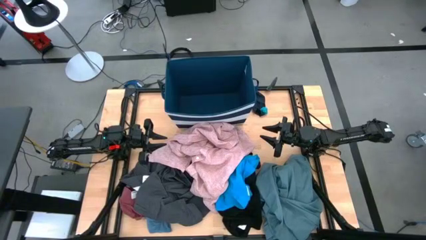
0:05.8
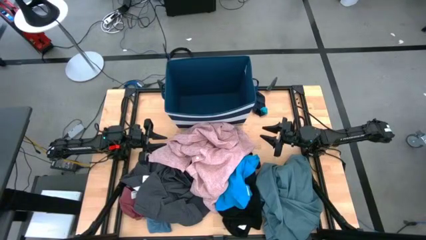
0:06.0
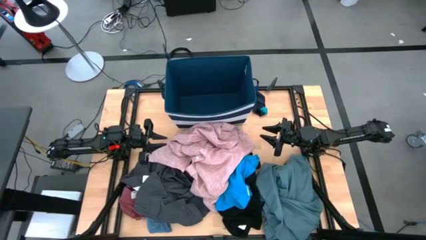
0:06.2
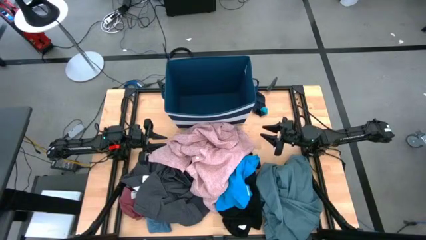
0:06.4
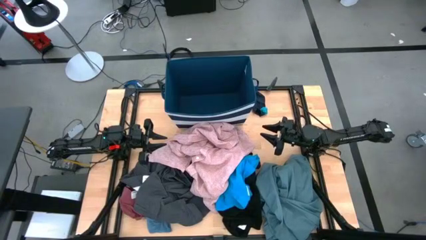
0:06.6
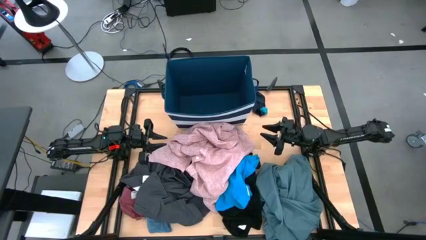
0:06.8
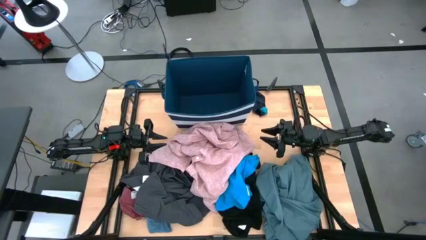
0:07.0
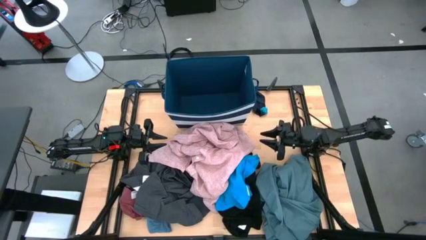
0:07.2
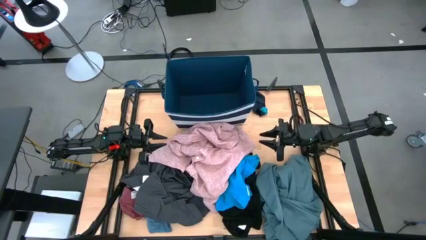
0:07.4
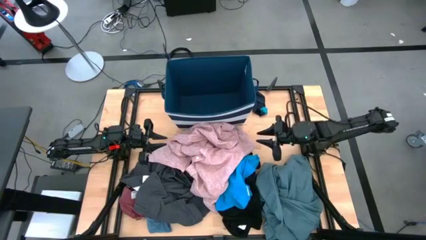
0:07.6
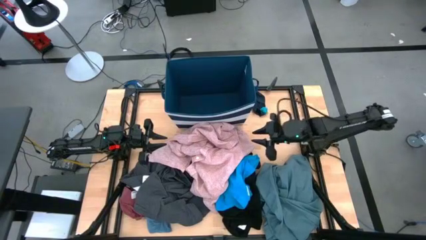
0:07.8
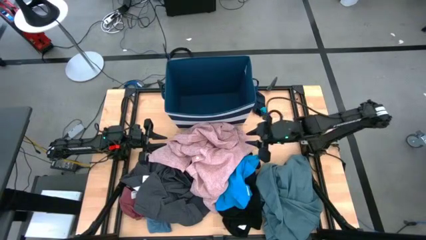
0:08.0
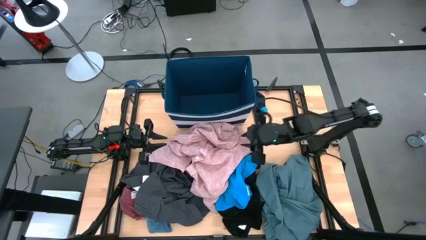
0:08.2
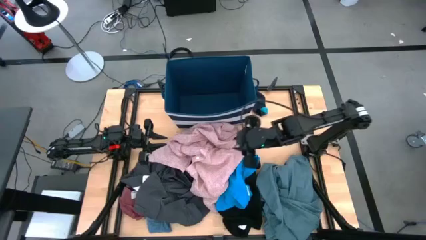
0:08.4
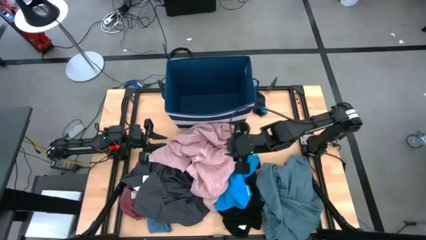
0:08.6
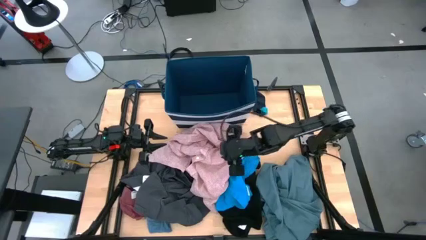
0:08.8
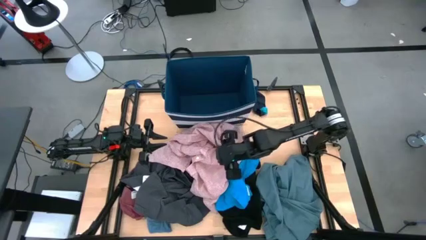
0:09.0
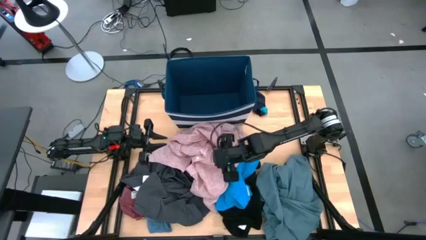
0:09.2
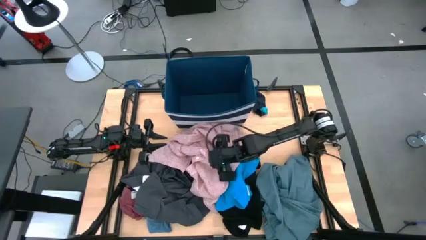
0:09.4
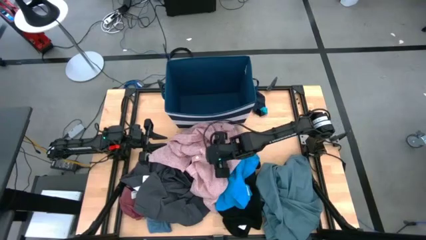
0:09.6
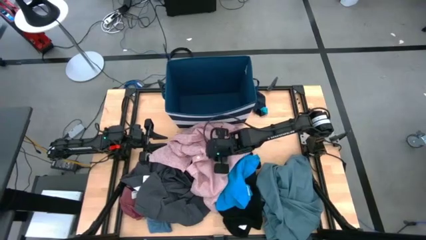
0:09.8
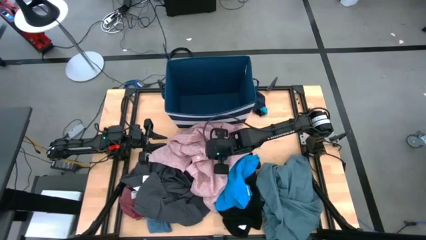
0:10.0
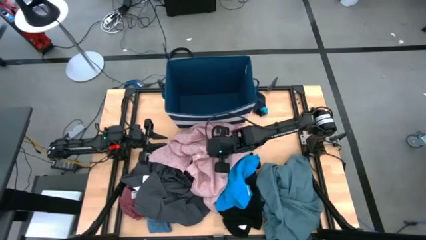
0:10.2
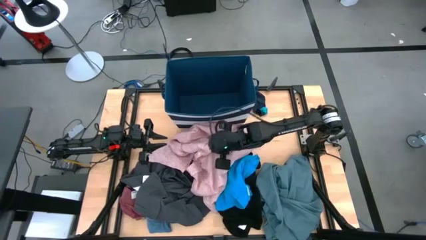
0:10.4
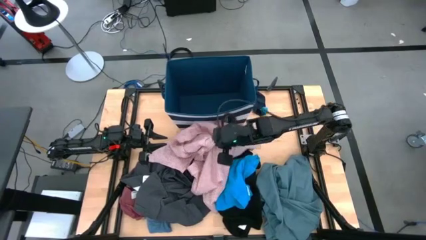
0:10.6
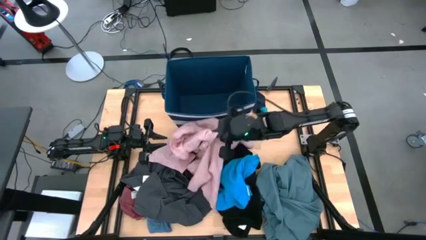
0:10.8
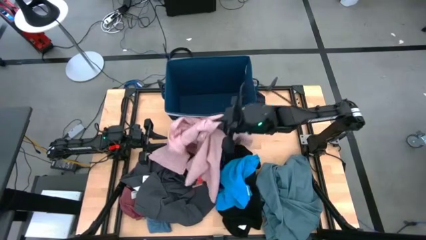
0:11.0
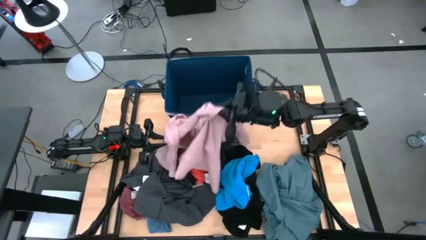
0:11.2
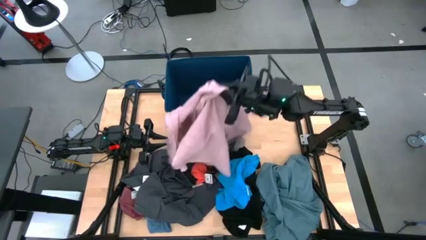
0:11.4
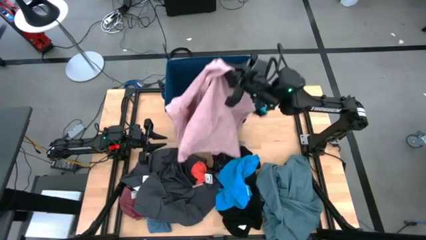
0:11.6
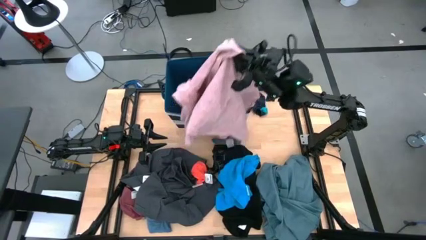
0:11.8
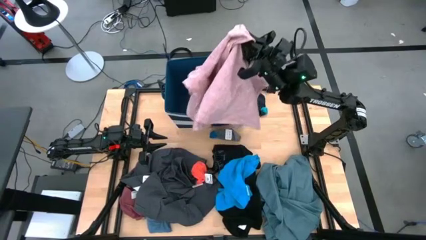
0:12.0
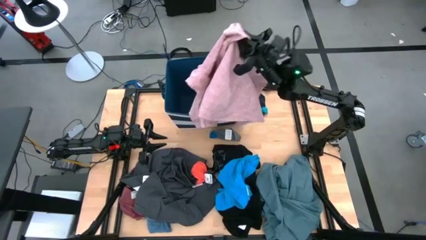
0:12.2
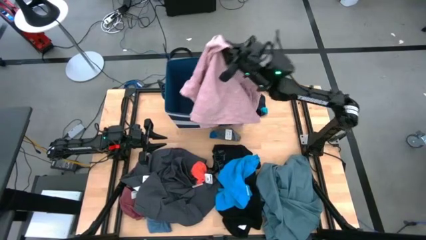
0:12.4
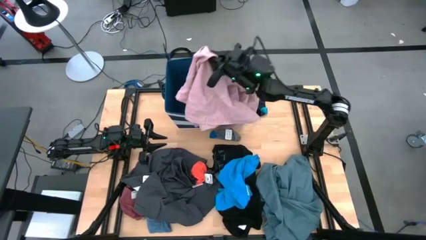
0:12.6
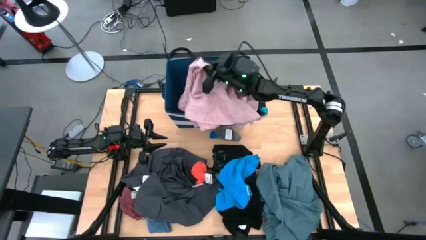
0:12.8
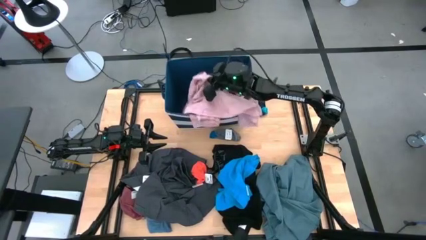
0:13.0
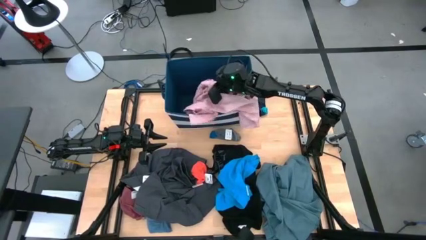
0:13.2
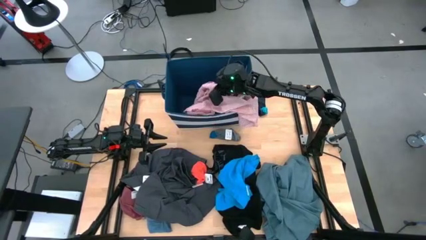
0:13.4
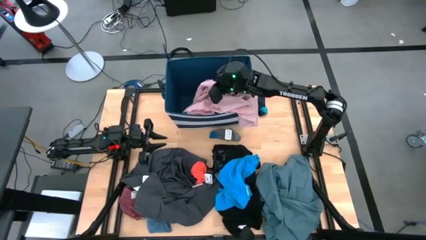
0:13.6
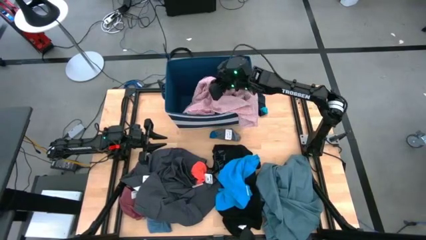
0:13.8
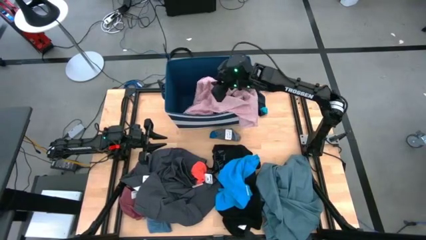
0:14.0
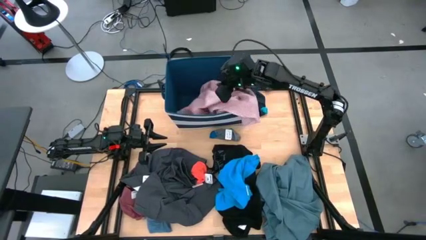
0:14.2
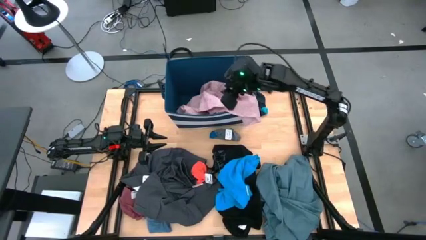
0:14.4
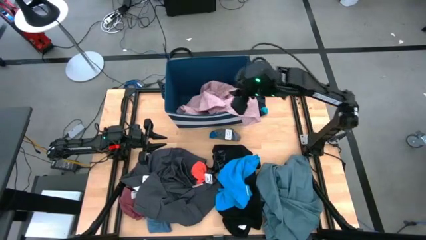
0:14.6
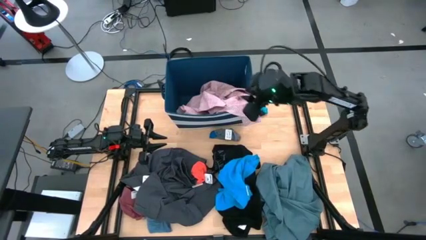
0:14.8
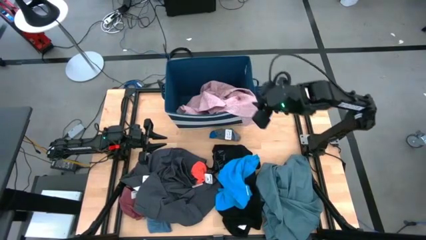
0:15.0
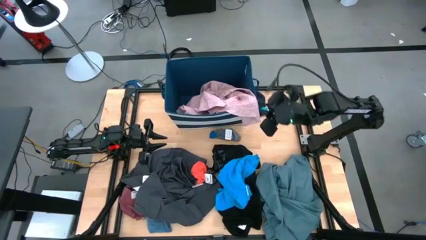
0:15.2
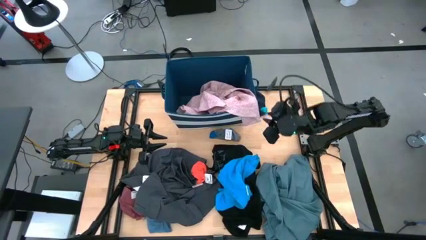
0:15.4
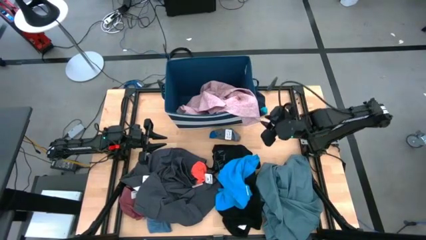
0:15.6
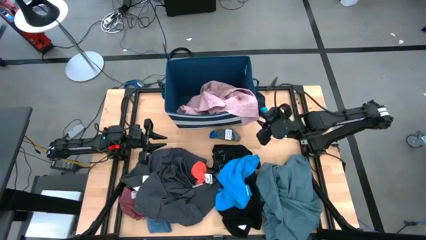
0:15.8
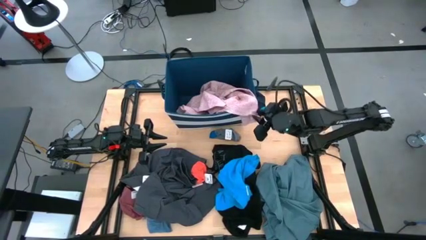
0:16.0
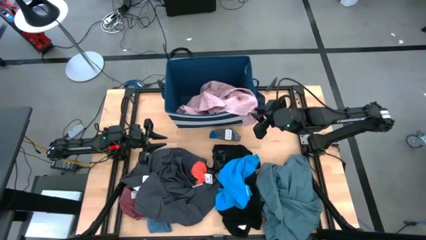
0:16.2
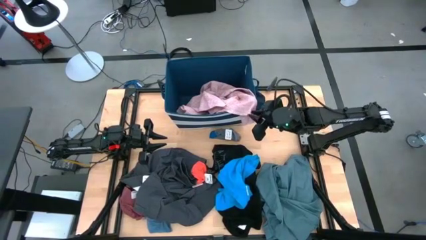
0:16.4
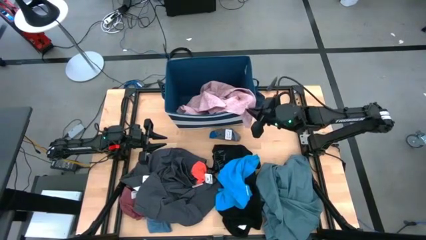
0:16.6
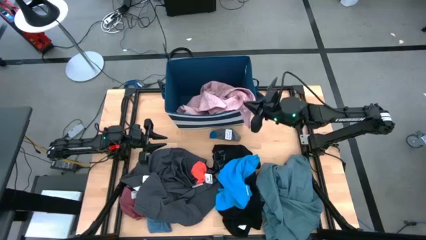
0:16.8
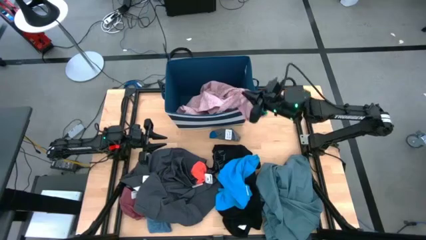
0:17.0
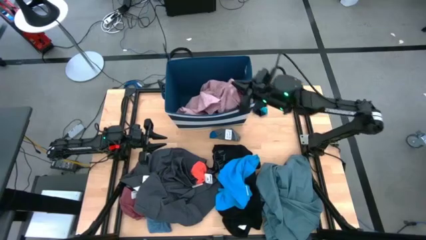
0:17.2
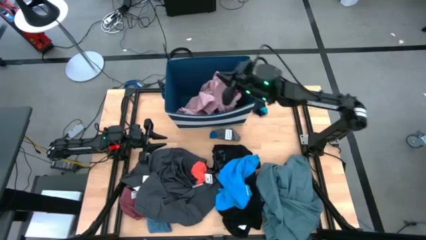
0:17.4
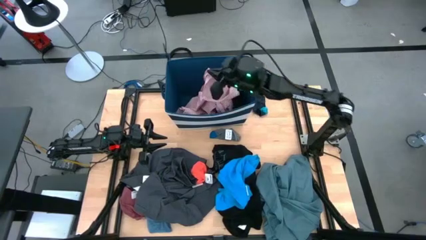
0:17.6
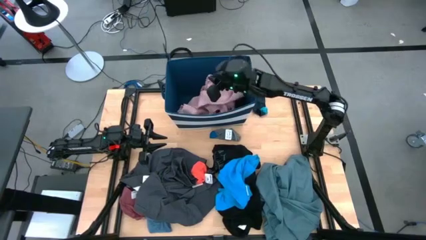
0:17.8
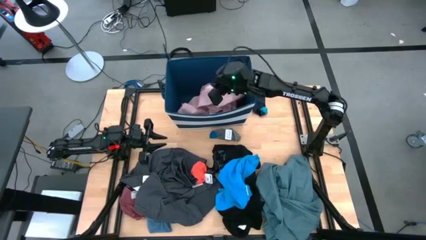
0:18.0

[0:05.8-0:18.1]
Task: Sort clothes
Put the pink polo shirt into the laundry organizer

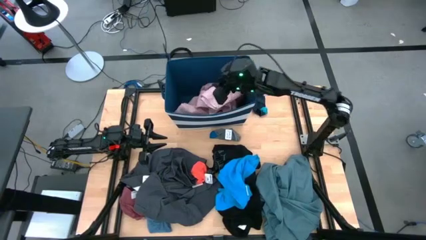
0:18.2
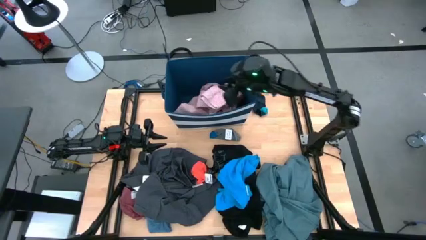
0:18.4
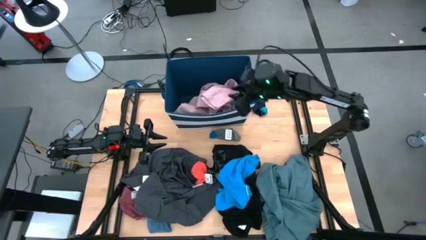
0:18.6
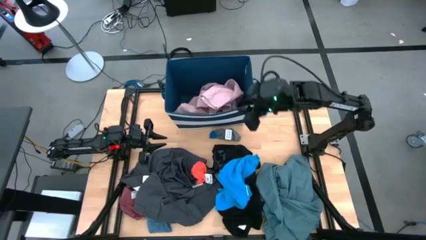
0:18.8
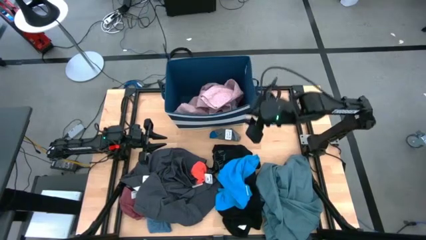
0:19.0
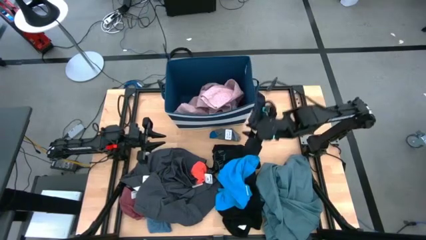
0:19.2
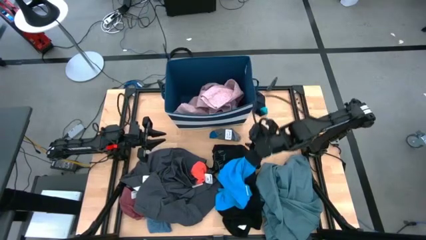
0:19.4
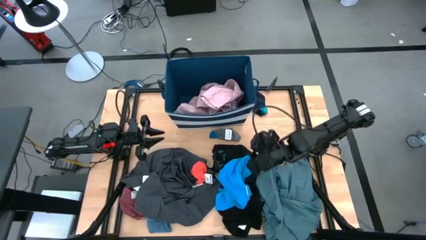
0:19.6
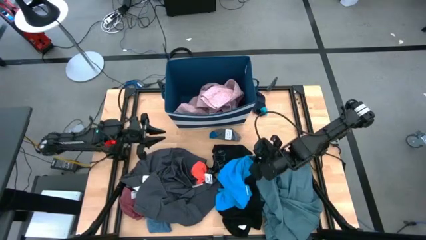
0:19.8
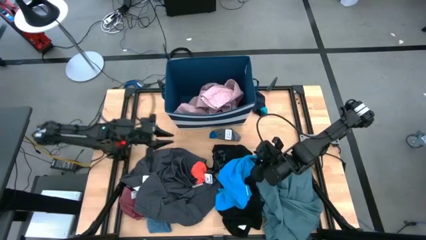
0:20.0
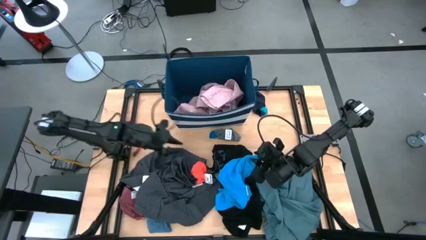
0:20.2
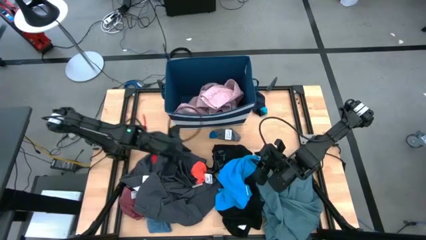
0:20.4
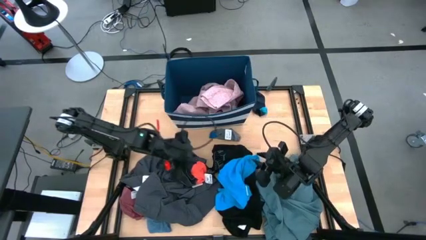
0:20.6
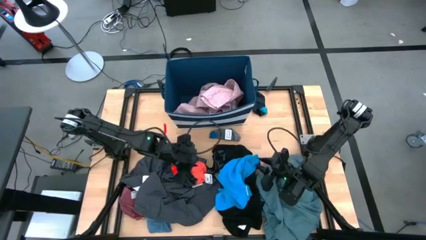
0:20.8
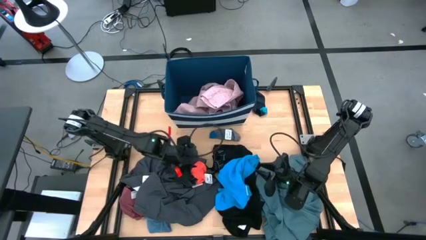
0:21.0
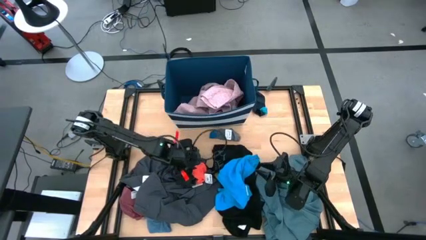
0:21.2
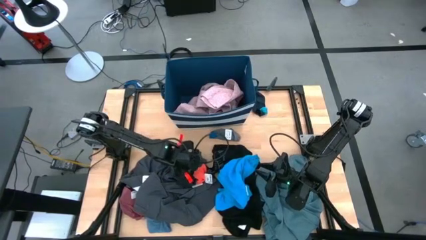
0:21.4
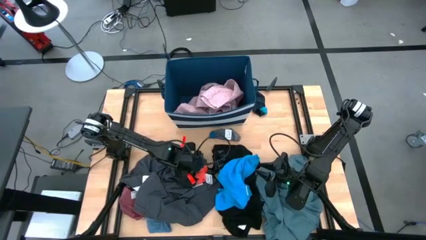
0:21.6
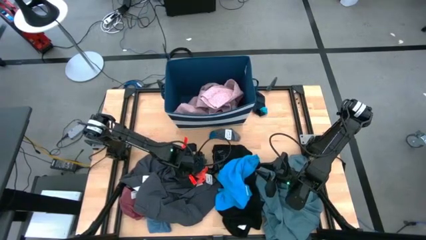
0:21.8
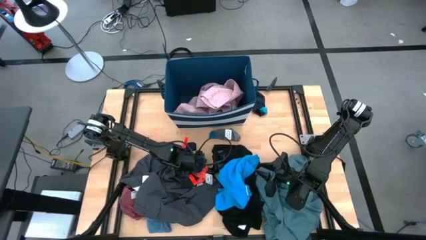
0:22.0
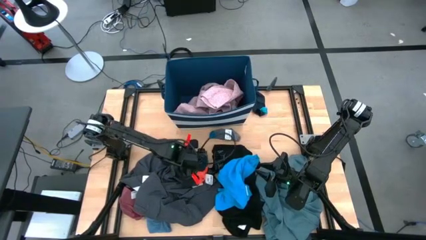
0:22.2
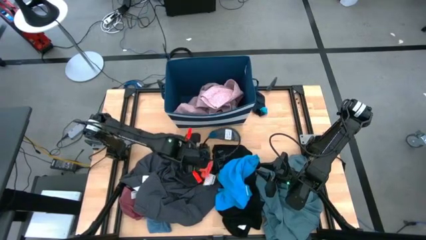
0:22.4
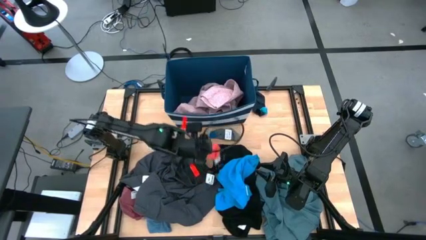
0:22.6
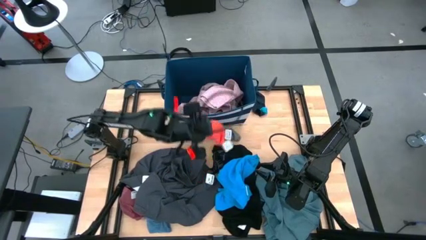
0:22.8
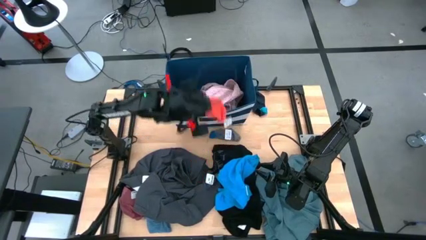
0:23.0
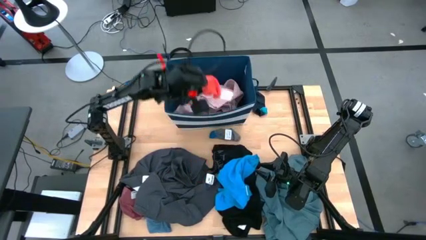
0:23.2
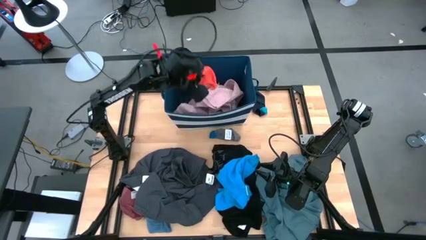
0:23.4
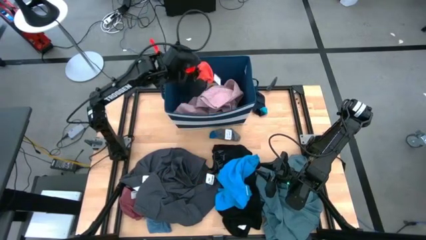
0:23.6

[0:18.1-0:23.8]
Put the orange sock into the laundry organizer
